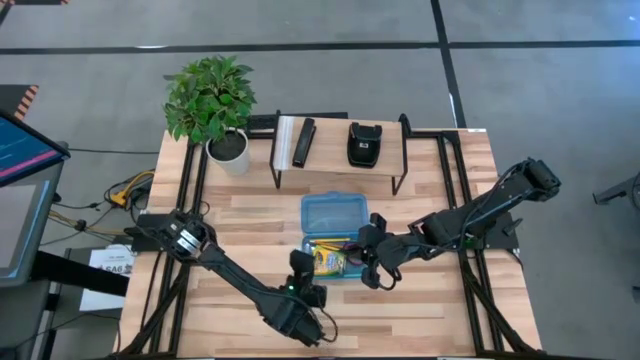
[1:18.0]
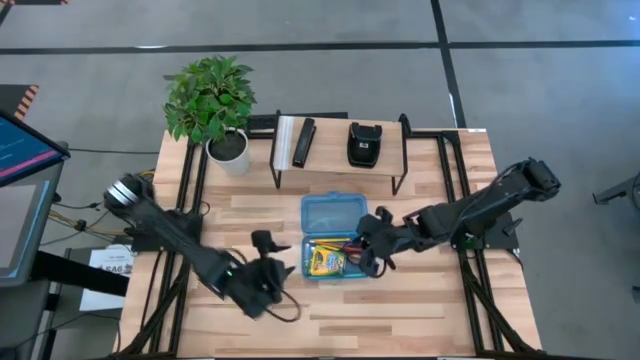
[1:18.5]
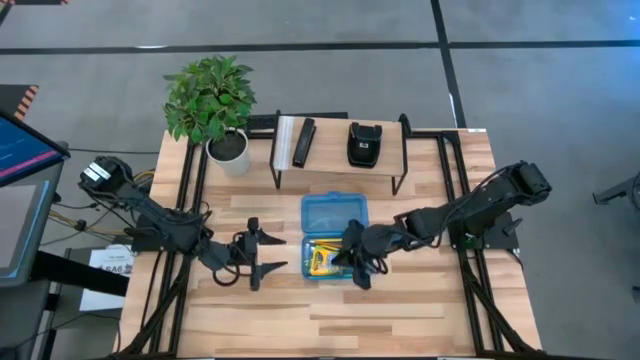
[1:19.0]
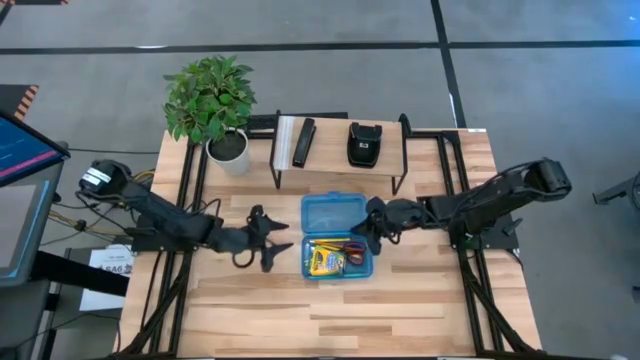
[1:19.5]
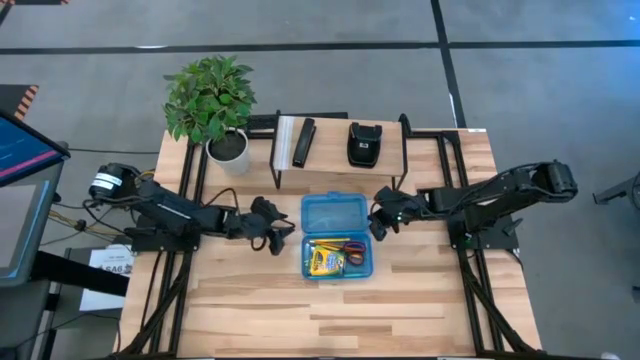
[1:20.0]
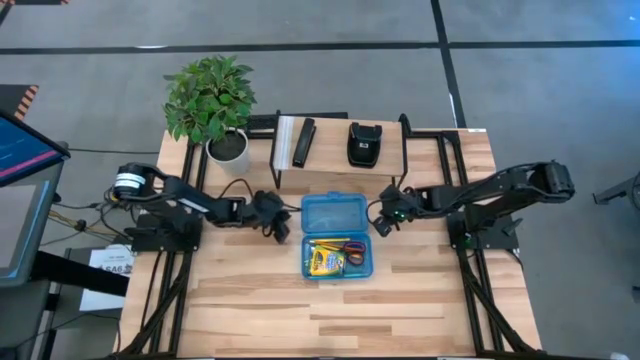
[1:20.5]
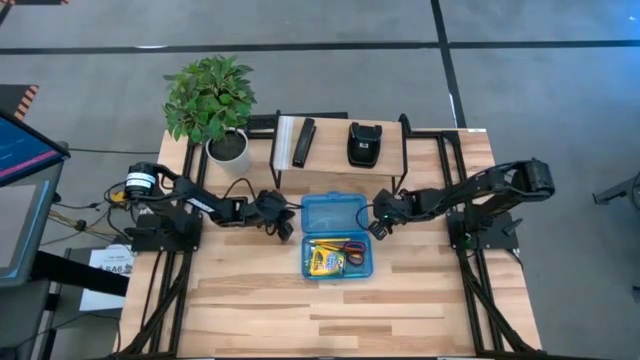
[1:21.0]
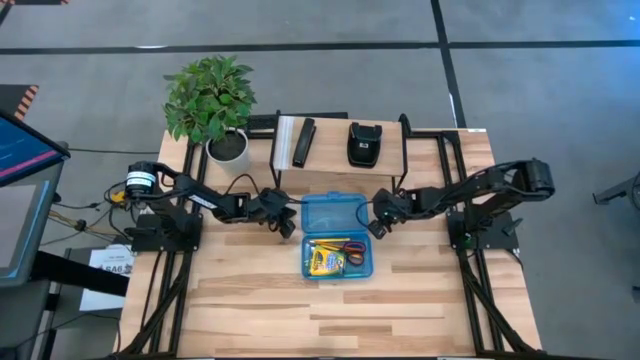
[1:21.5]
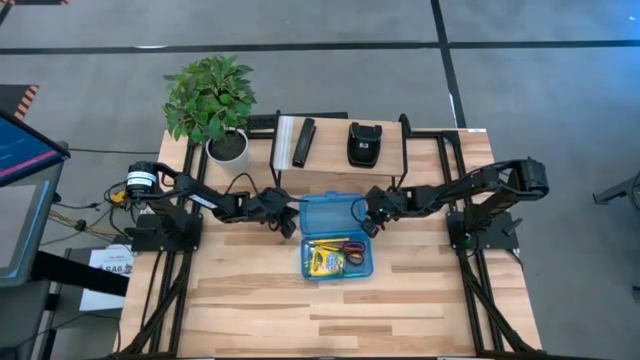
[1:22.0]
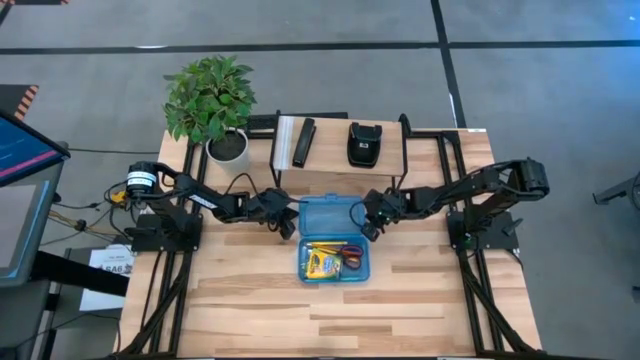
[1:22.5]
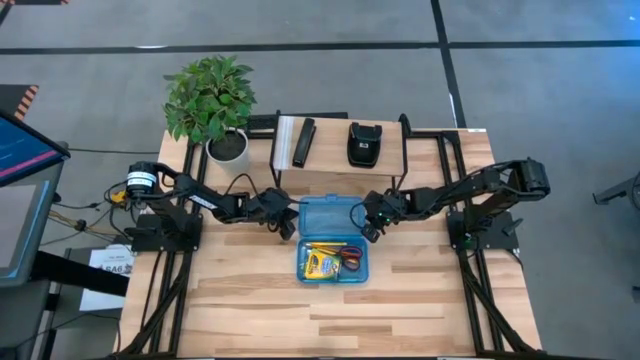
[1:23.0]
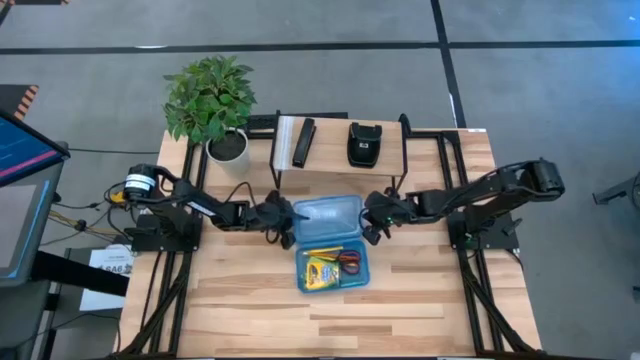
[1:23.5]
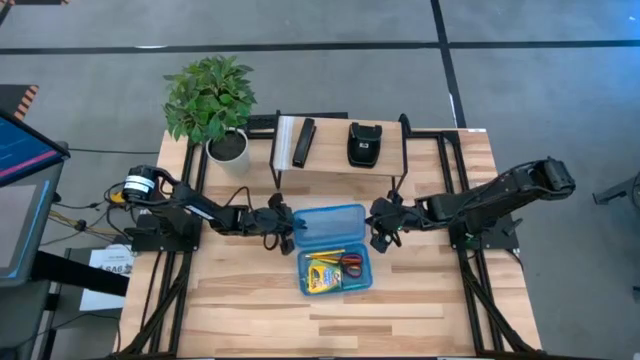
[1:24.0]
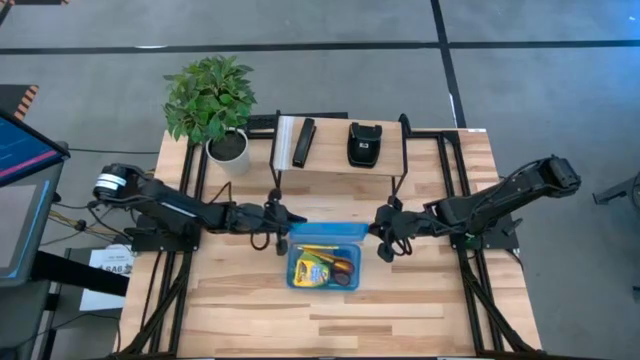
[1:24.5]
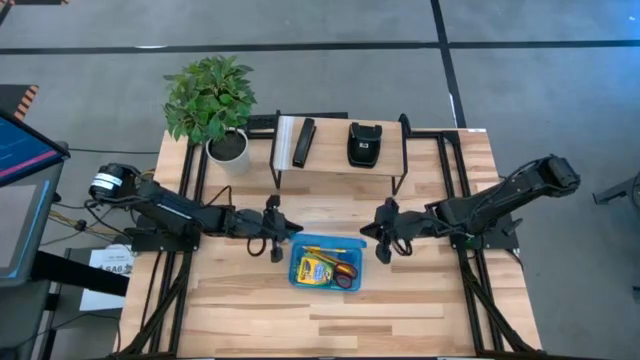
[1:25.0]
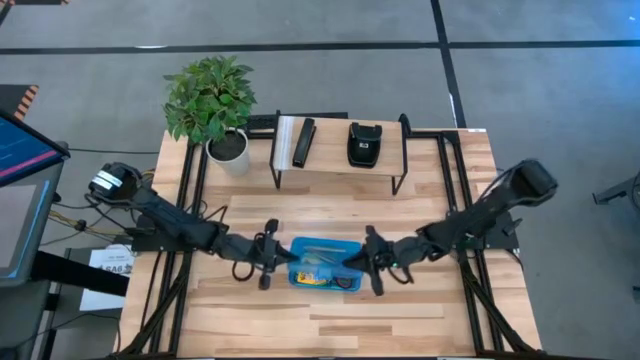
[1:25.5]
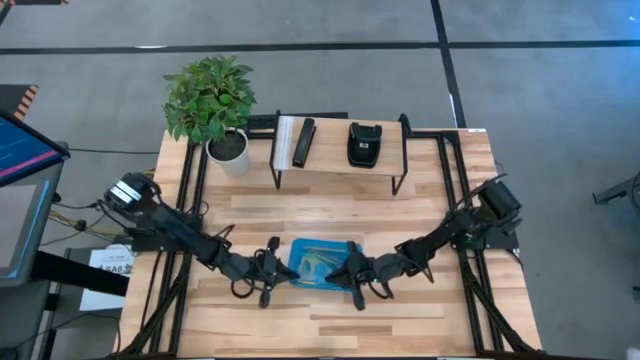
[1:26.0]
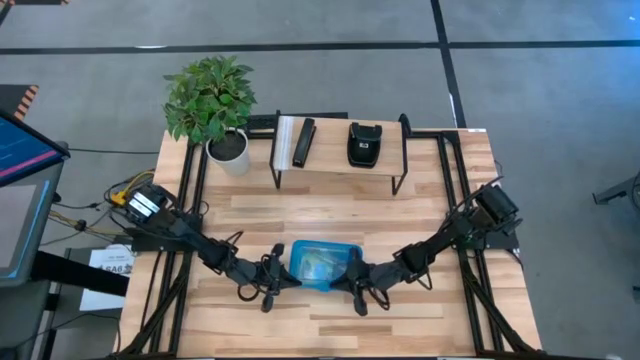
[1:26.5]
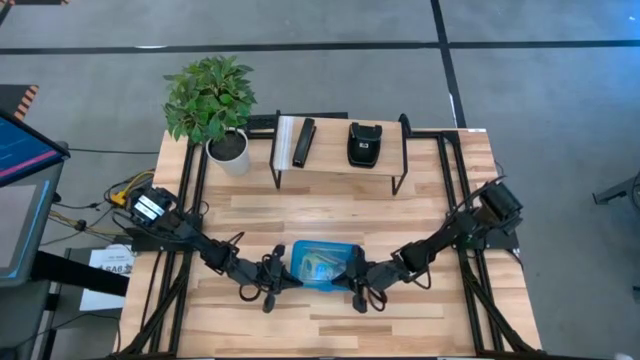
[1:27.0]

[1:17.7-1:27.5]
Task: Pack school essentials
Close the blue supply box

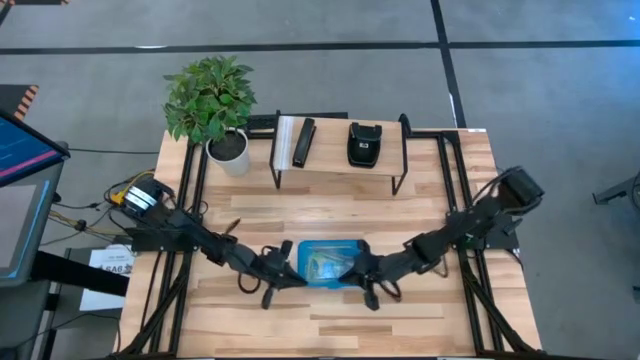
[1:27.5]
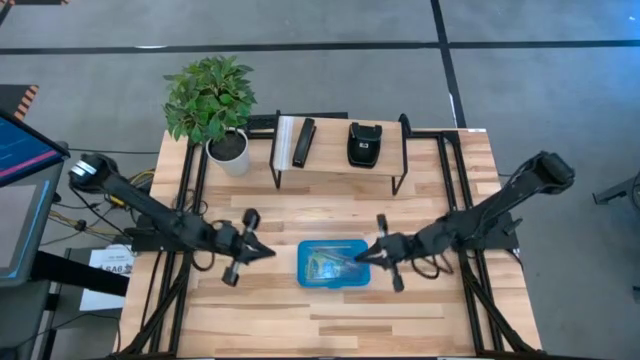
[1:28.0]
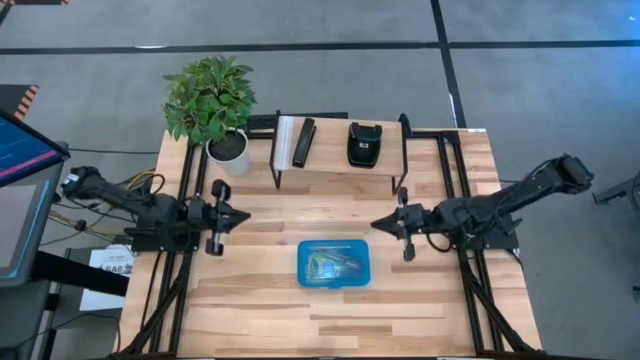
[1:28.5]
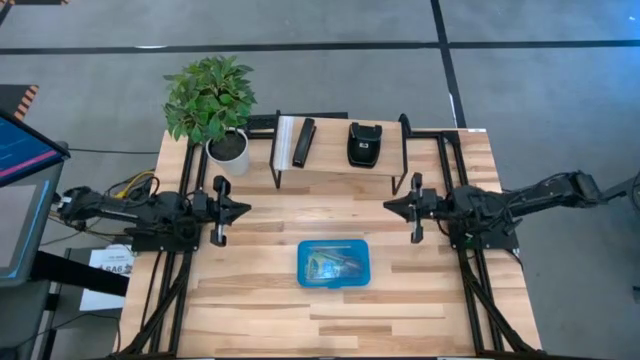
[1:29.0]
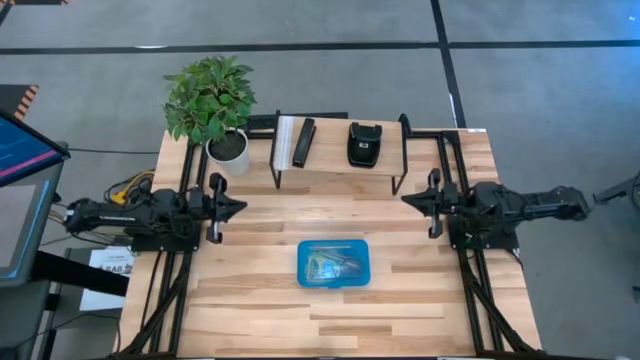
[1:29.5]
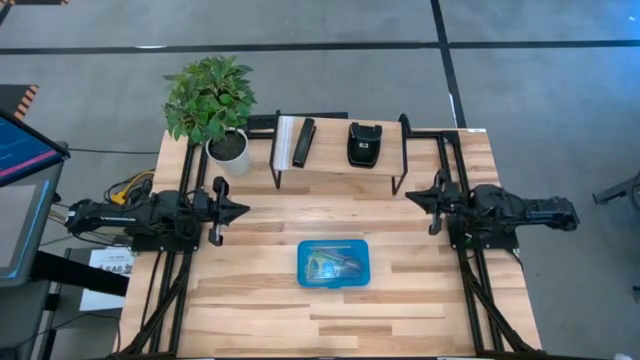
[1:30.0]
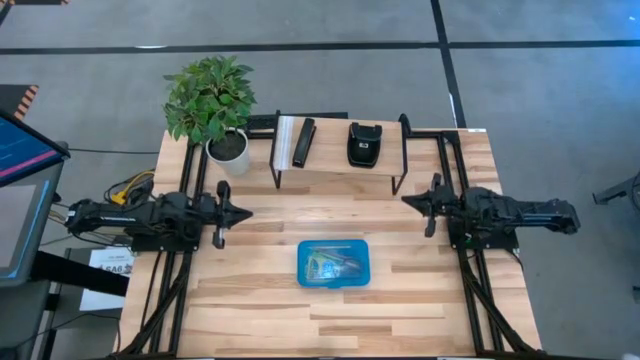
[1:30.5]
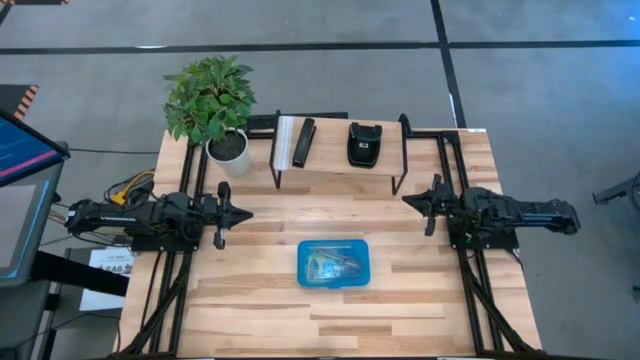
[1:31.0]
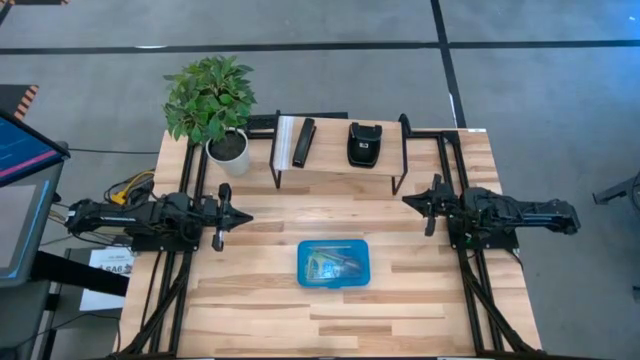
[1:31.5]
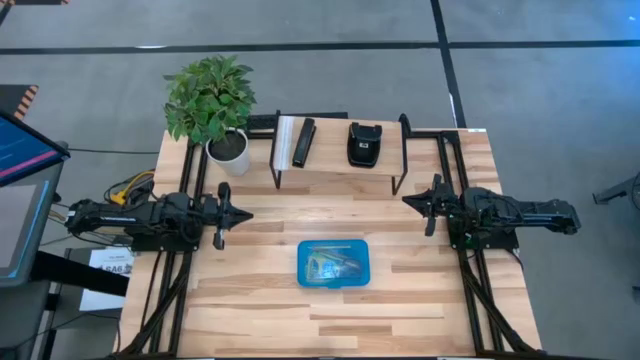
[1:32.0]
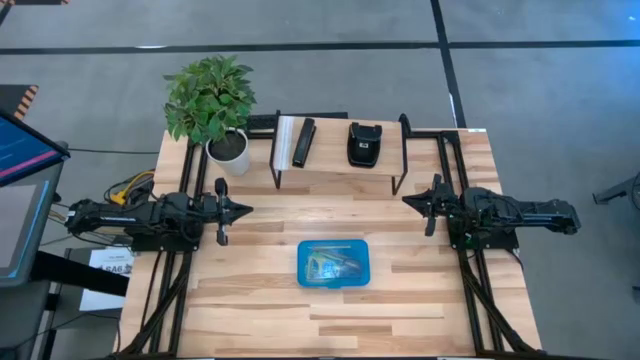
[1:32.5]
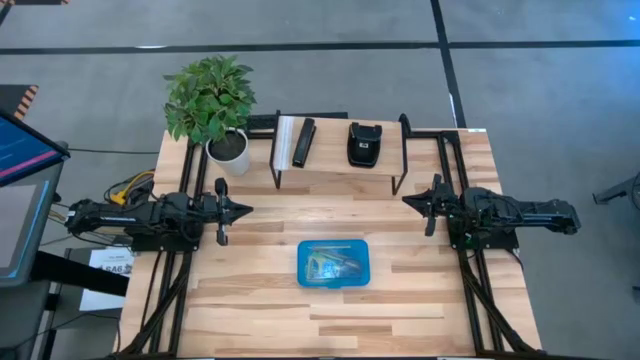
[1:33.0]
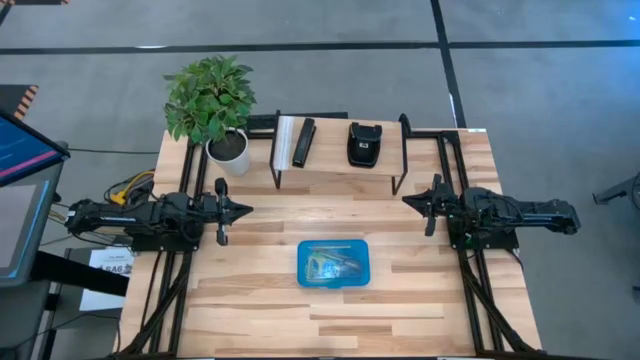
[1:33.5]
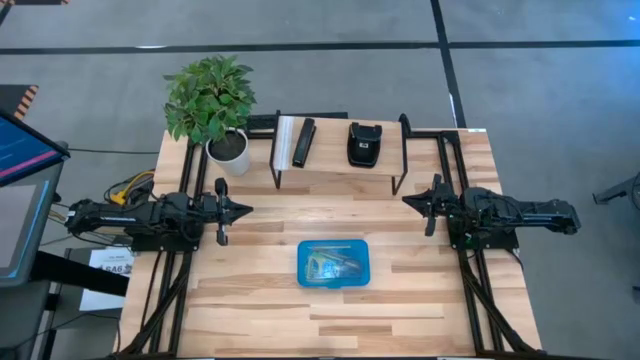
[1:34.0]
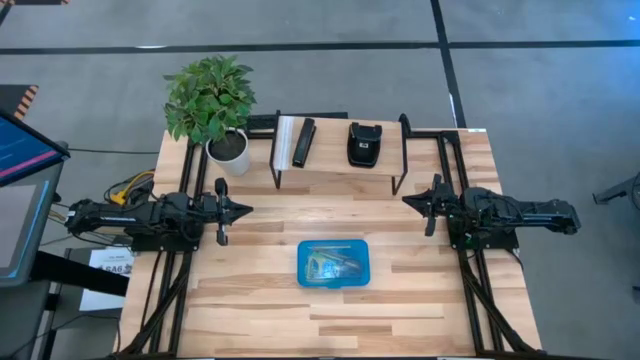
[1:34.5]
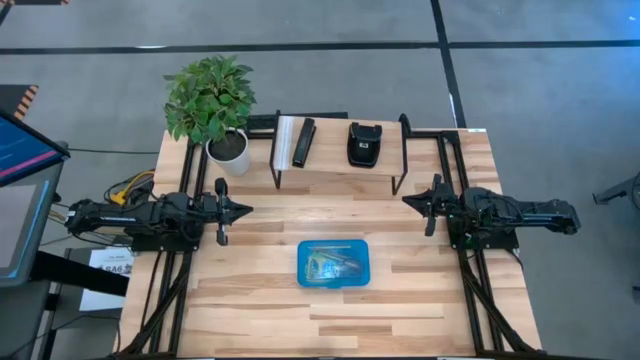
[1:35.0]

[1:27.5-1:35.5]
Return to Home Position

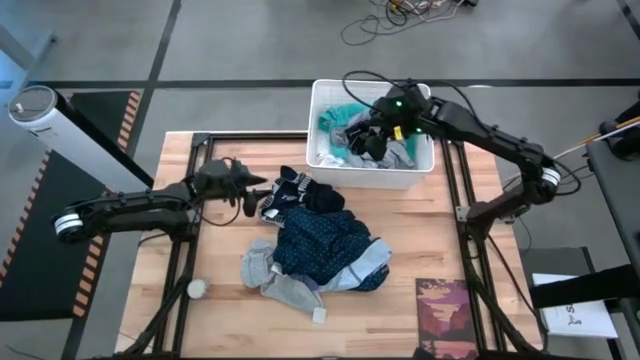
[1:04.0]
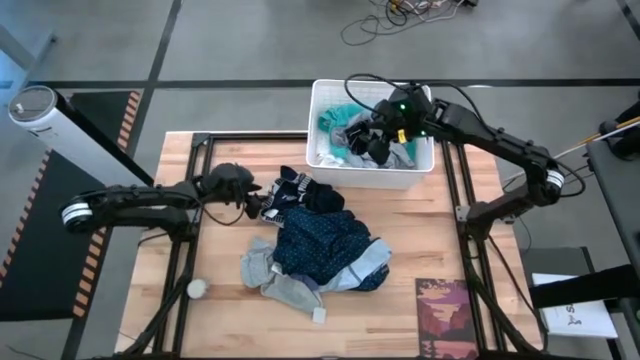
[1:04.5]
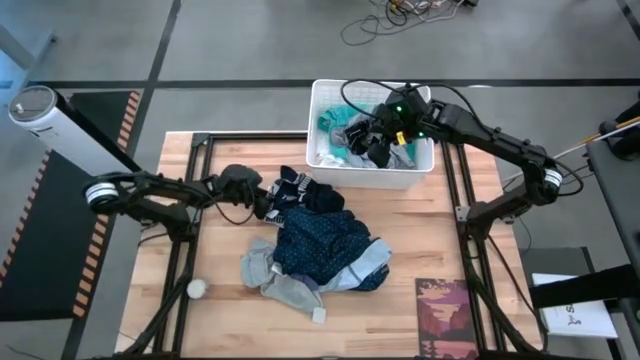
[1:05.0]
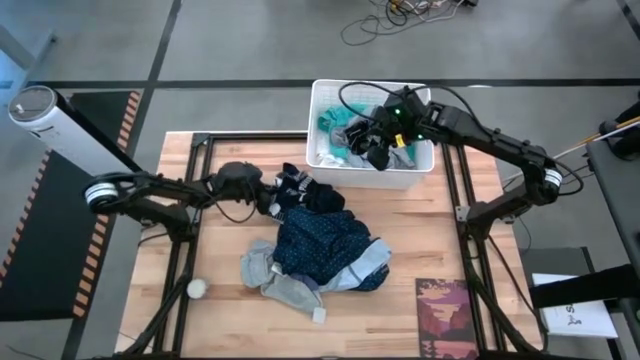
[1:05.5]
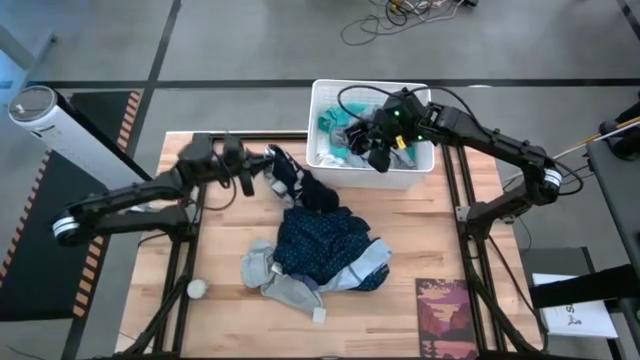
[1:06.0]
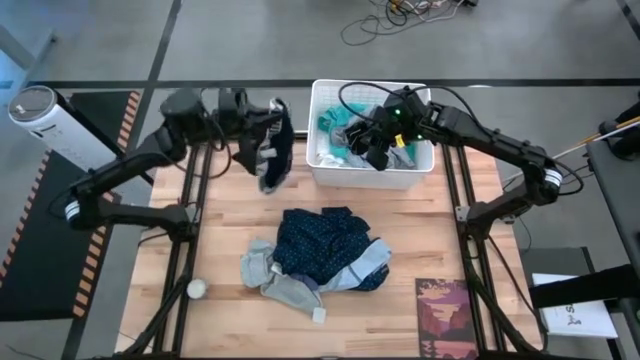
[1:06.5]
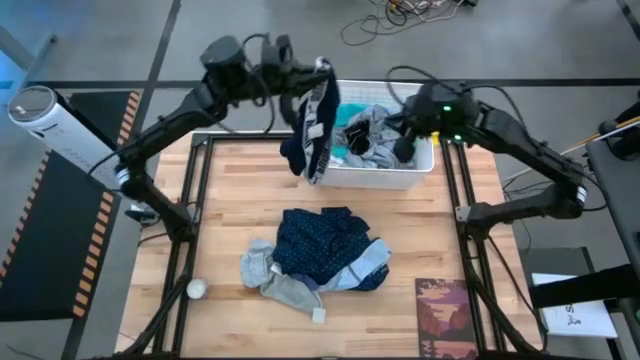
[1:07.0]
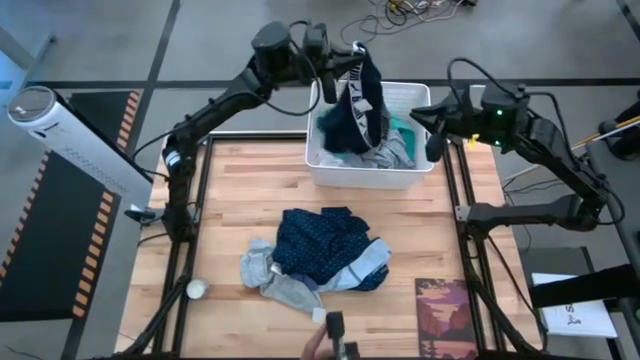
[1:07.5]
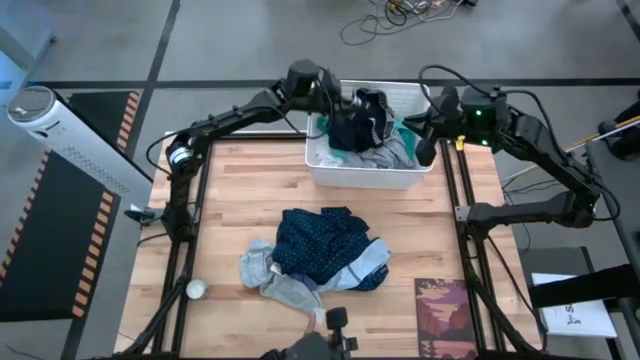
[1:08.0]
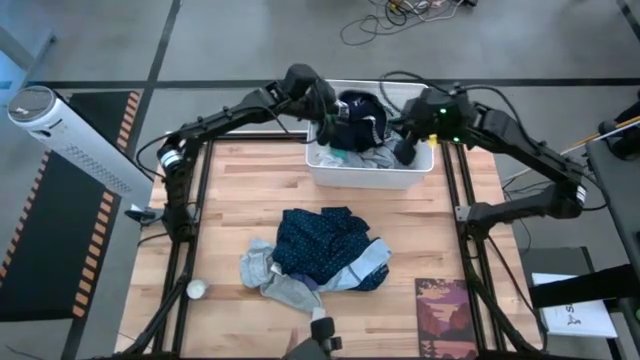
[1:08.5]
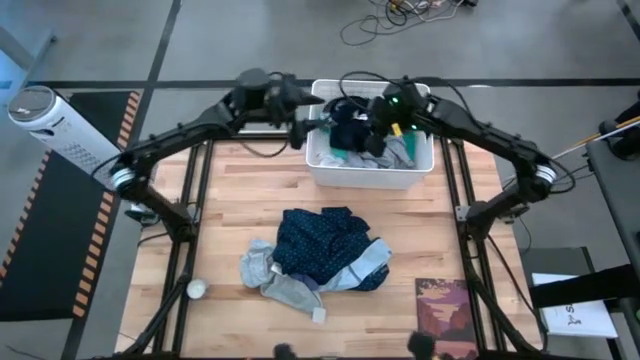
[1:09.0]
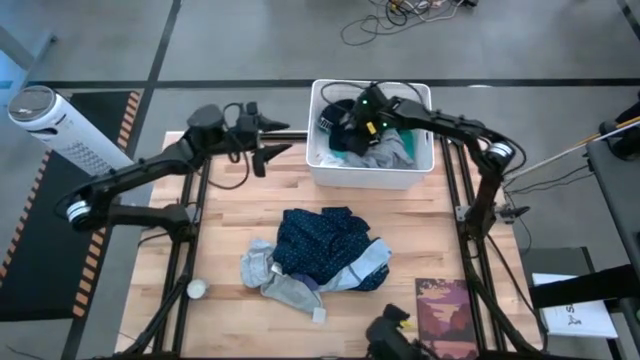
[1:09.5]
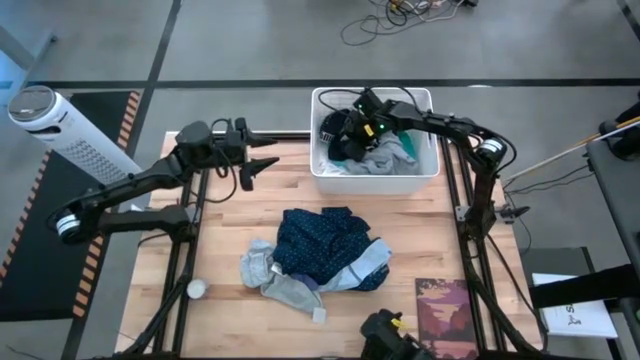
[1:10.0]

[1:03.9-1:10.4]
Task: Sort clothes
Put the blue boxer into the white laundry bin
